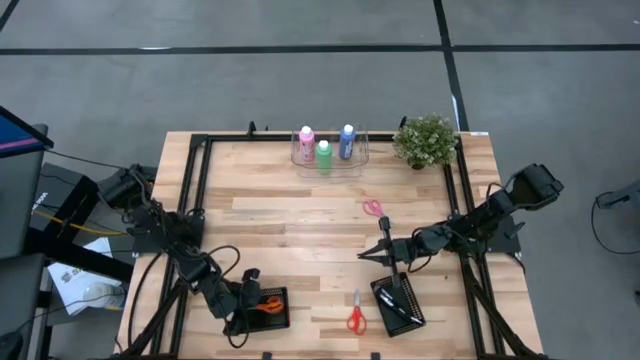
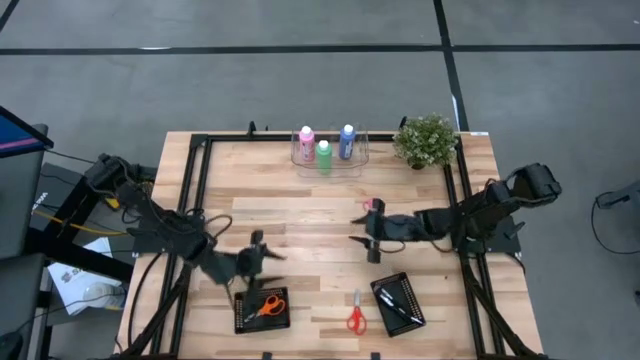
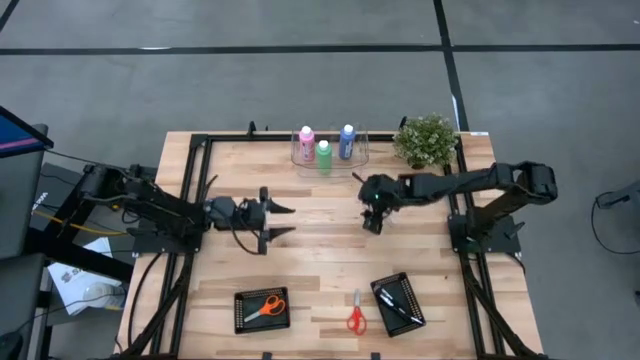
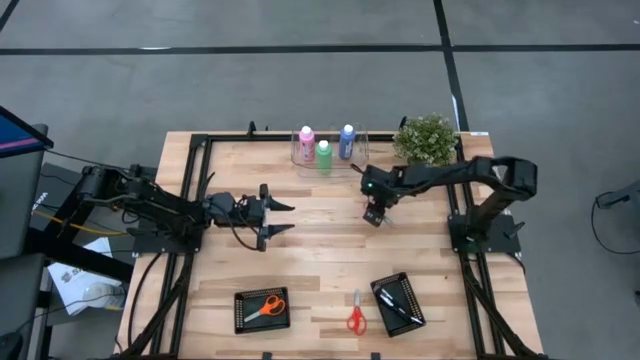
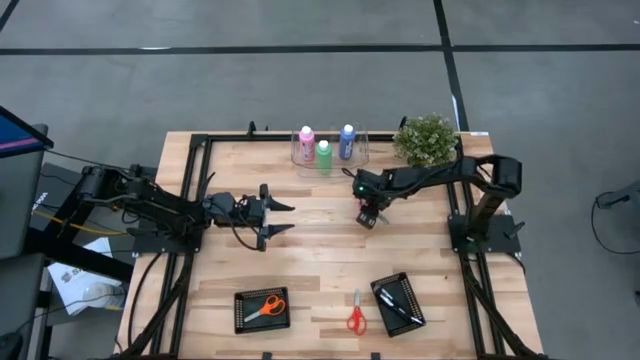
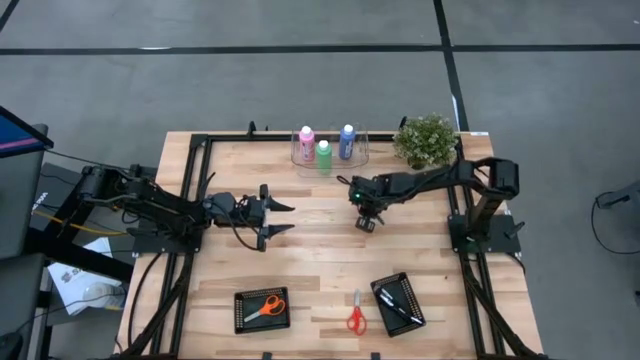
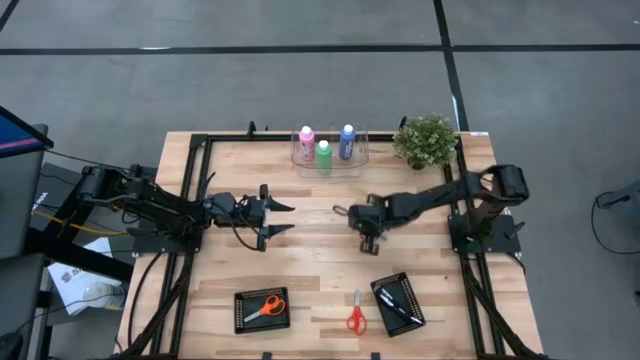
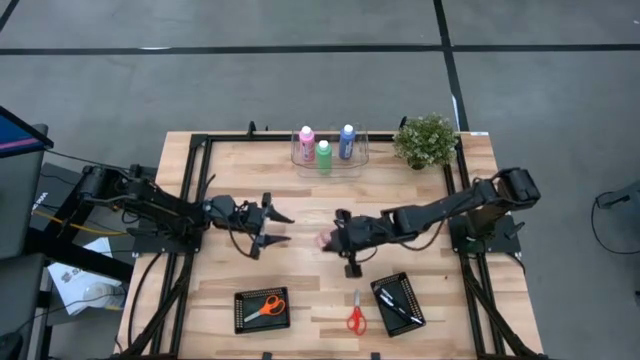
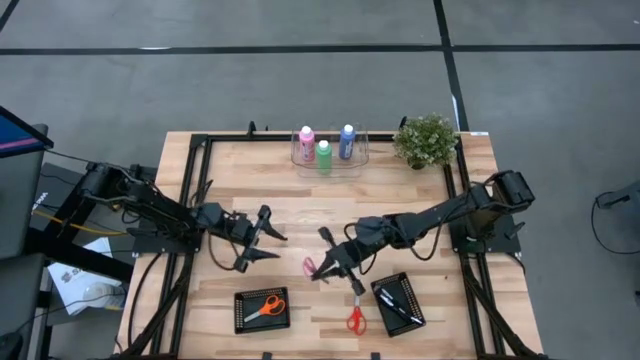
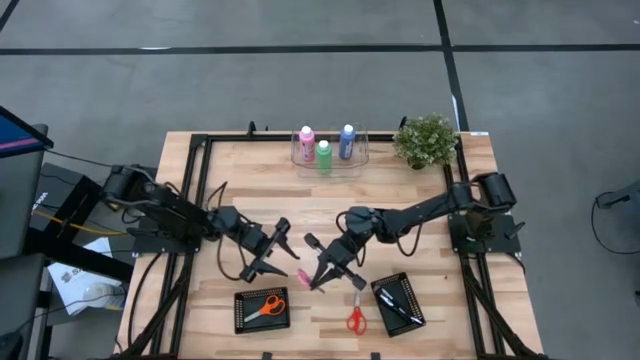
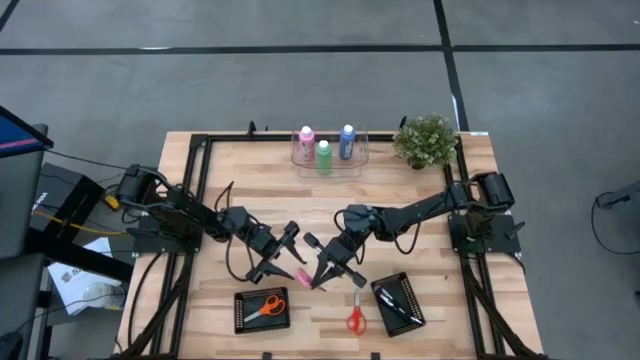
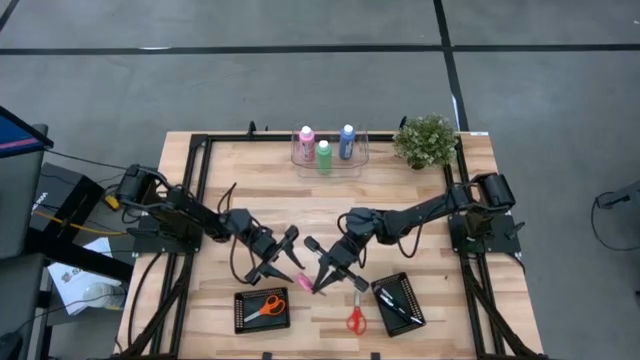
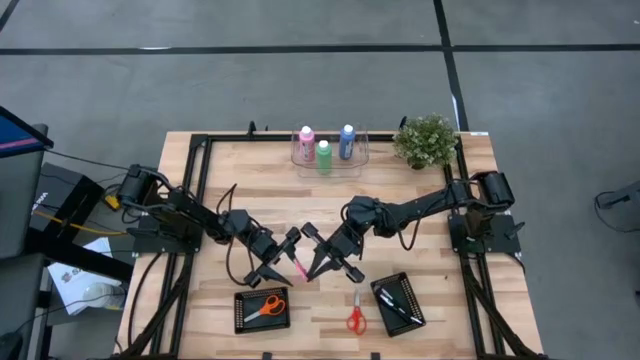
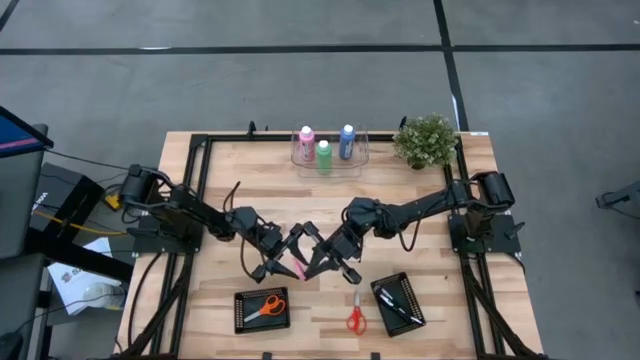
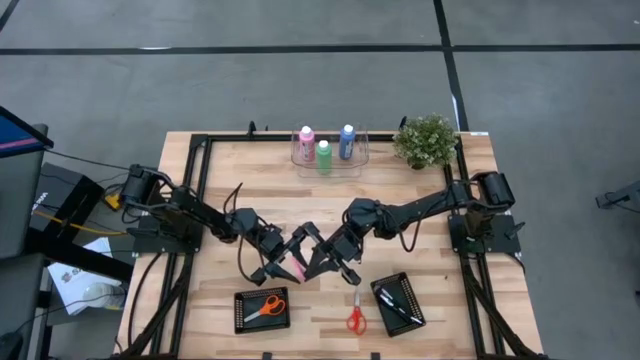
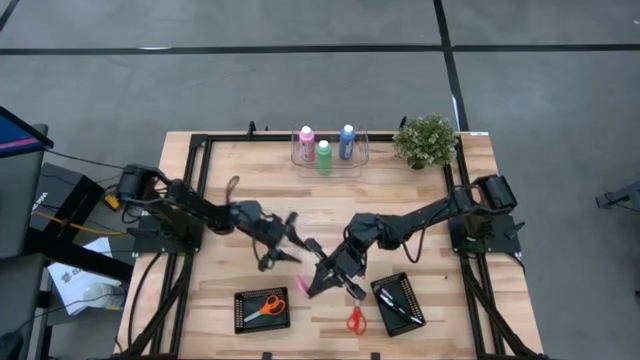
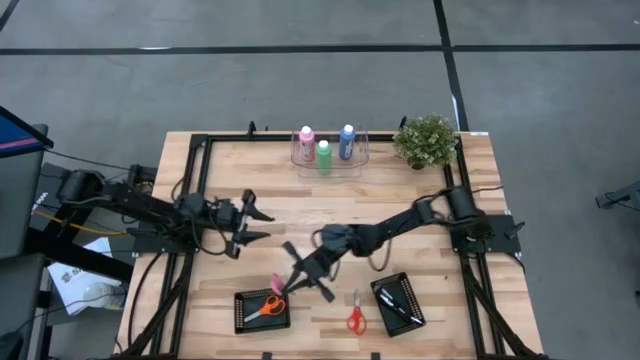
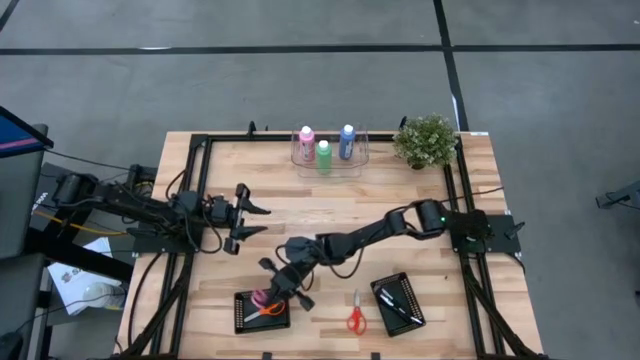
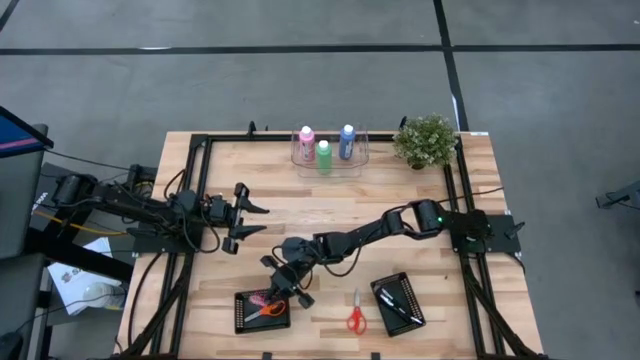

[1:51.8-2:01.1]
Task: Pick & Place Paint Supplies
Put the pink scissors into the left black bin

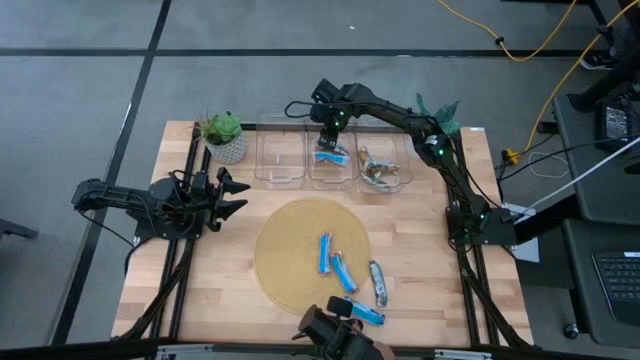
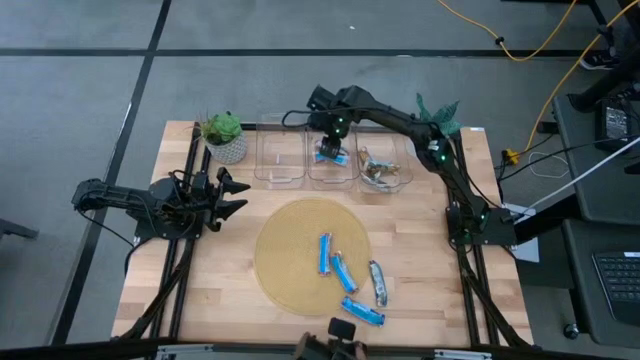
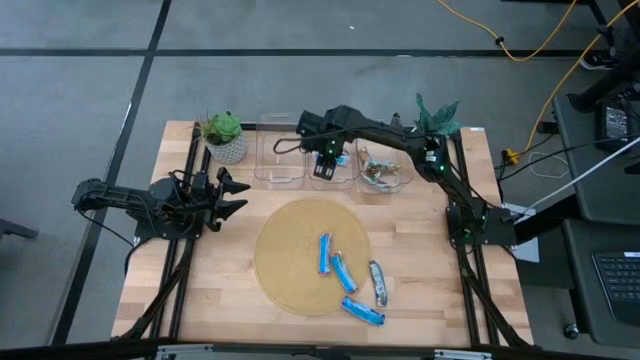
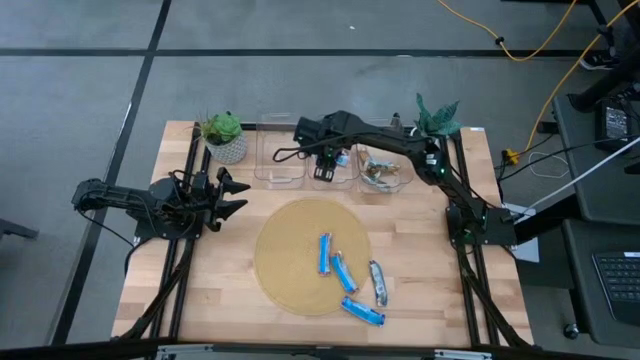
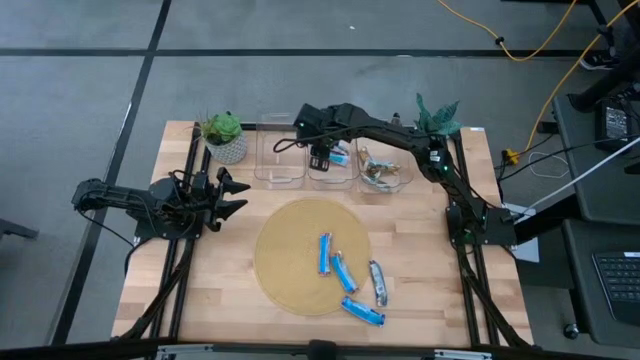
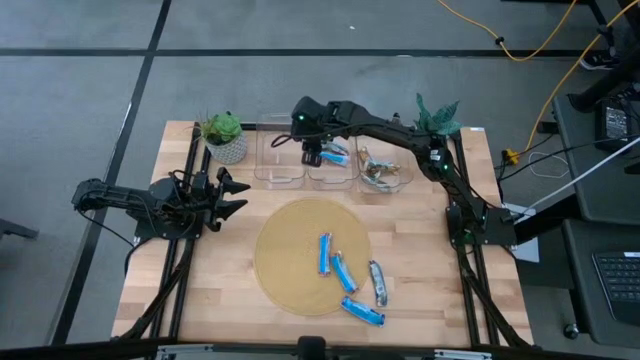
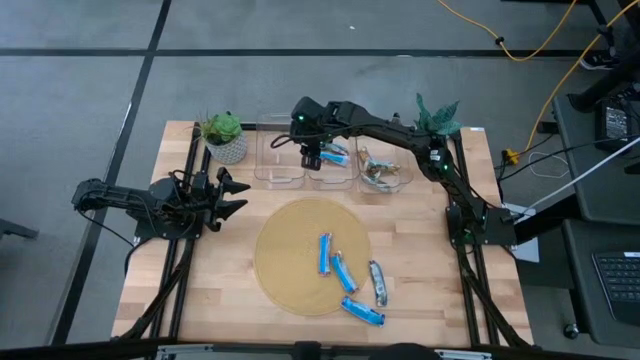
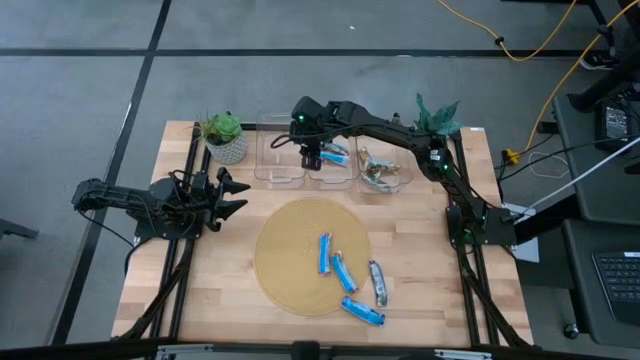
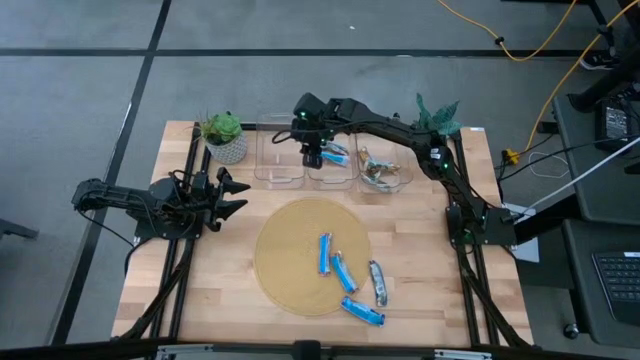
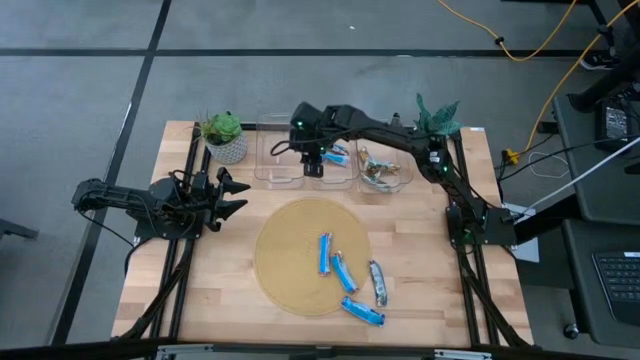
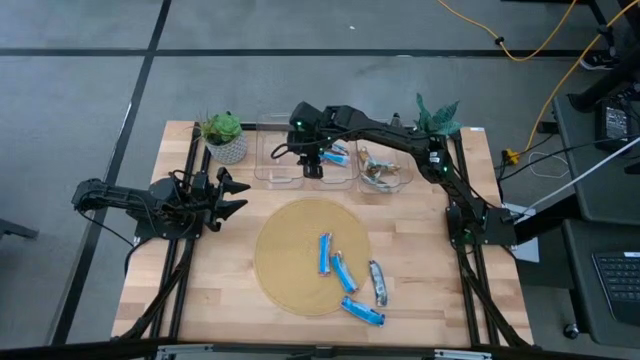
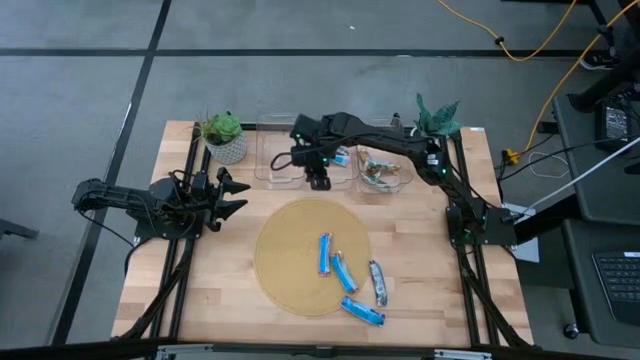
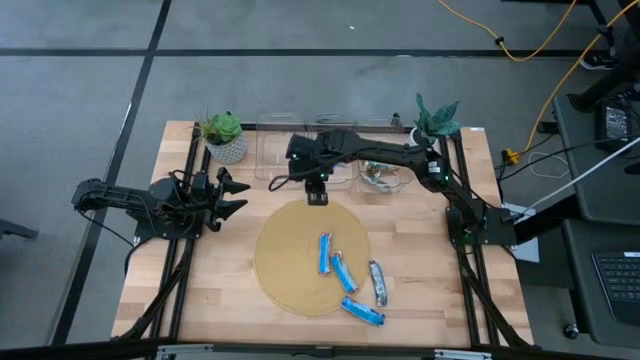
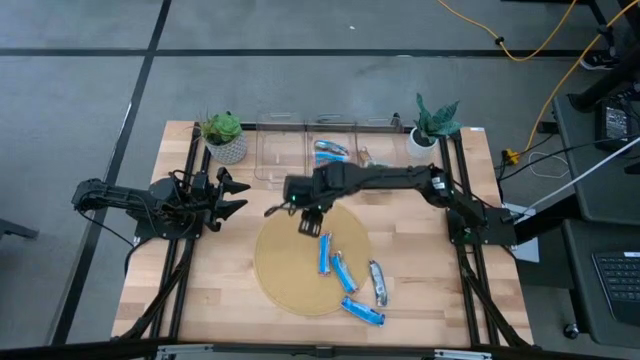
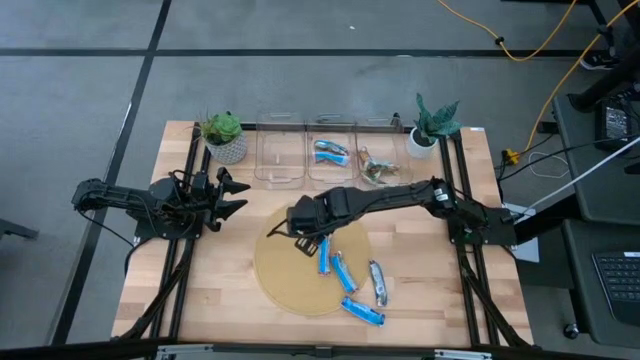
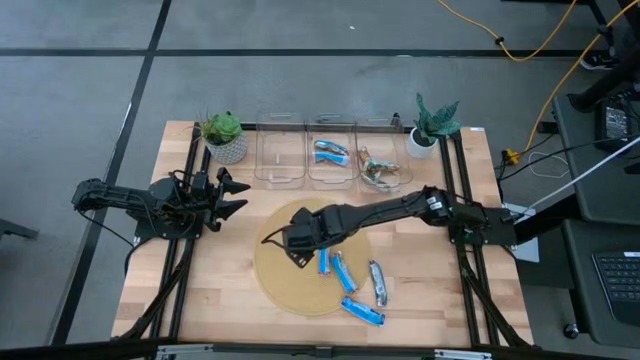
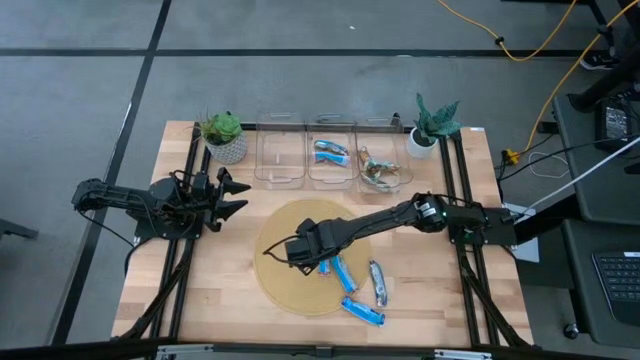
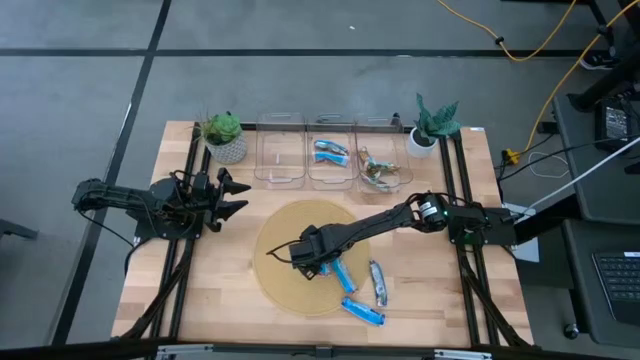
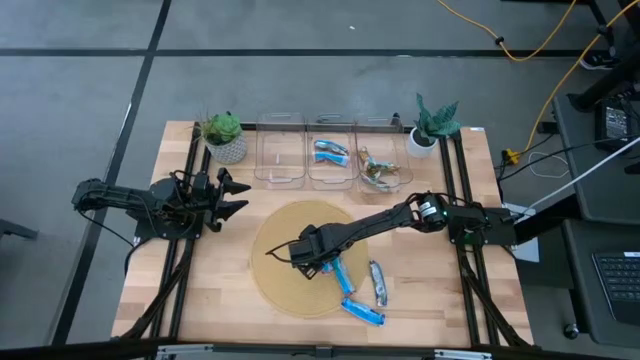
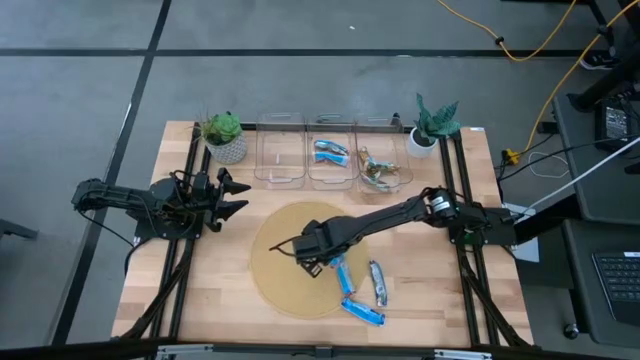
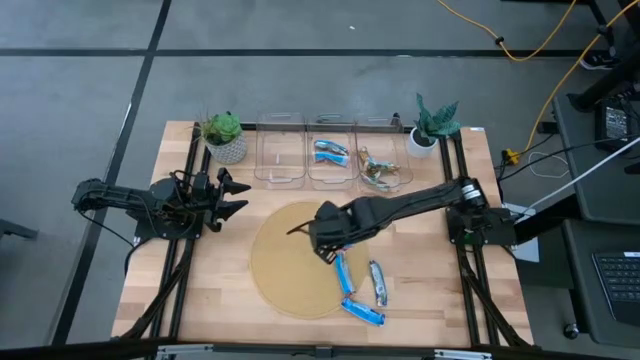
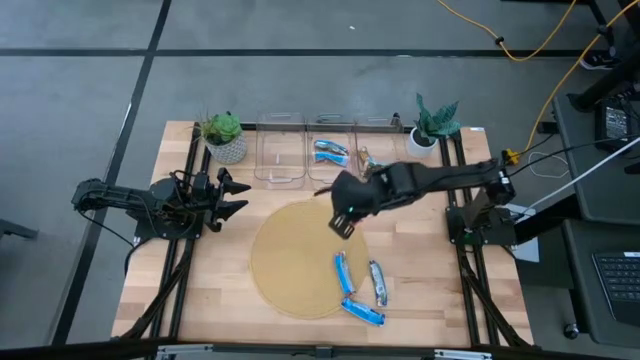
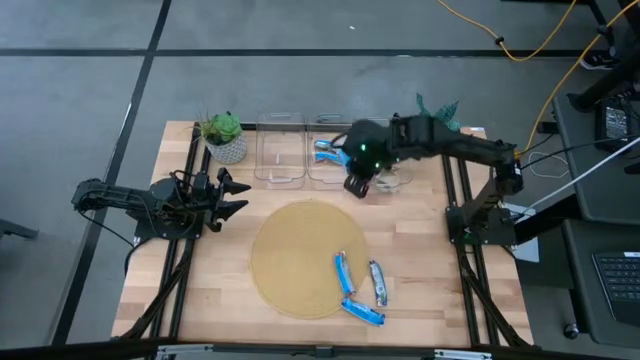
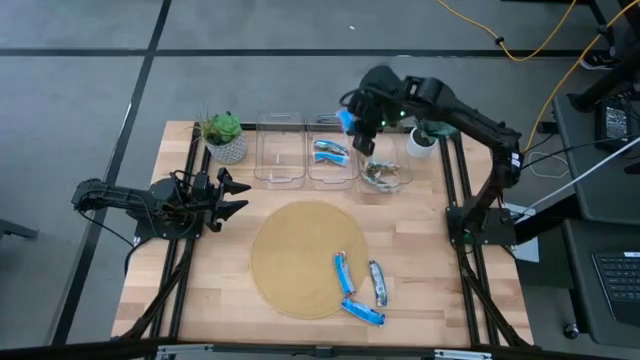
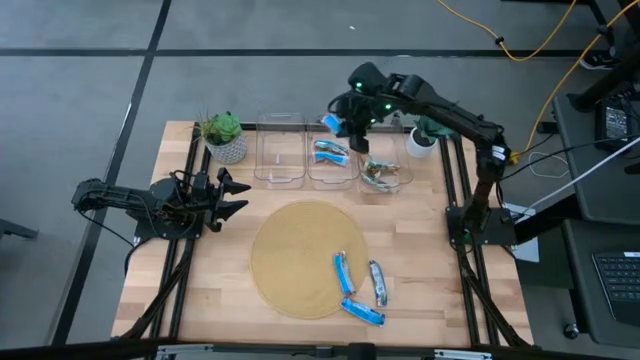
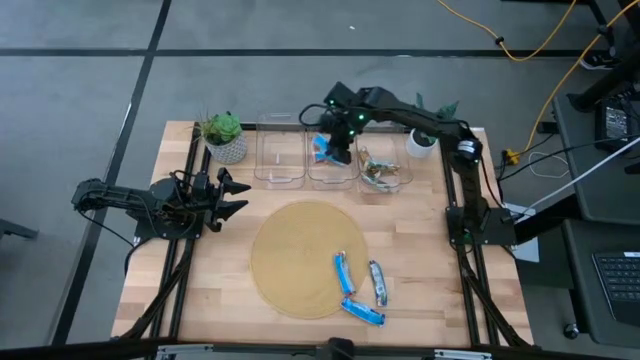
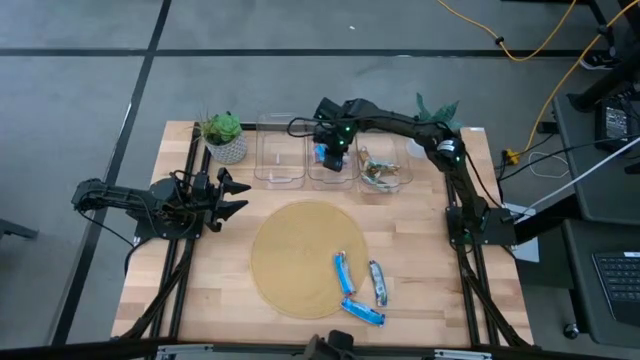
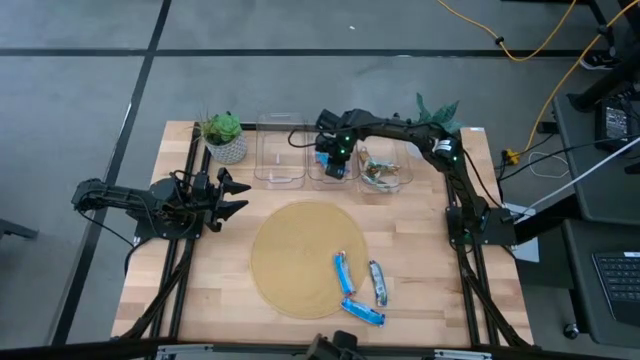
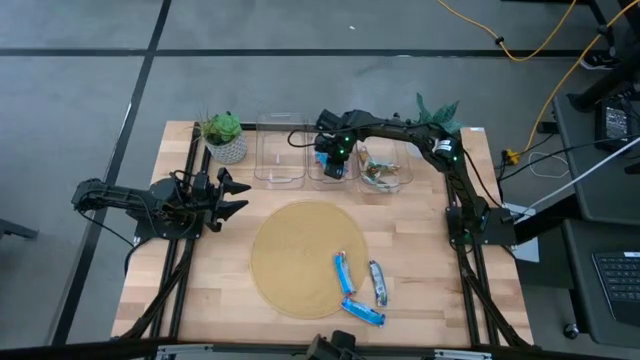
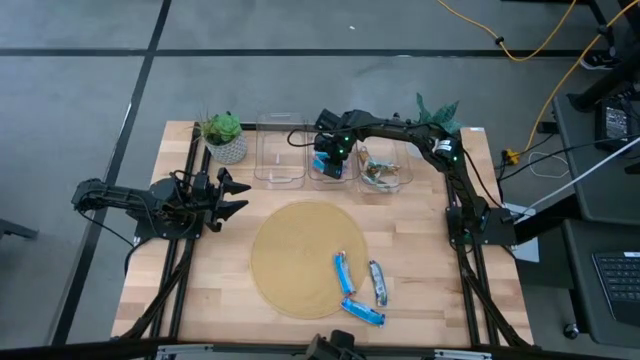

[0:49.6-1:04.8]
Task: Pick and place Granola Bars by type
Put the red granola bar into the middle transparent bin
